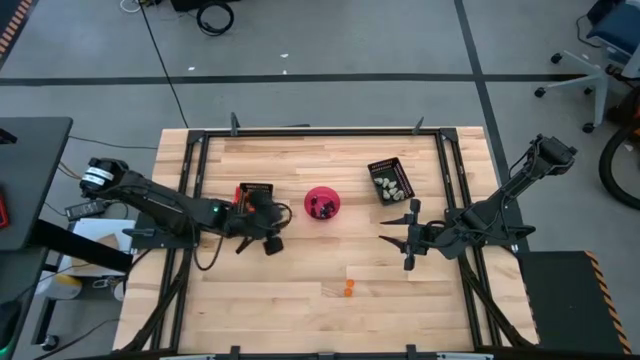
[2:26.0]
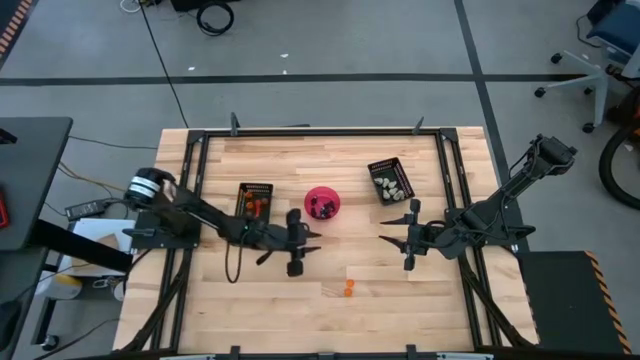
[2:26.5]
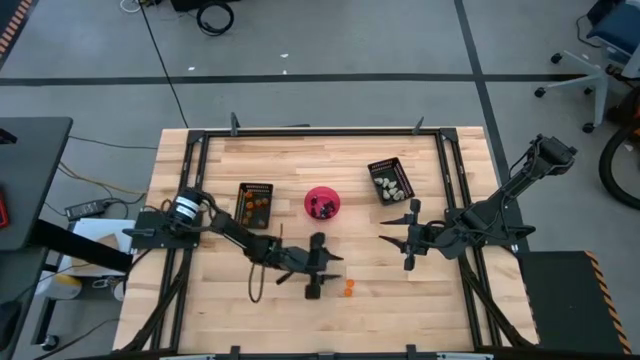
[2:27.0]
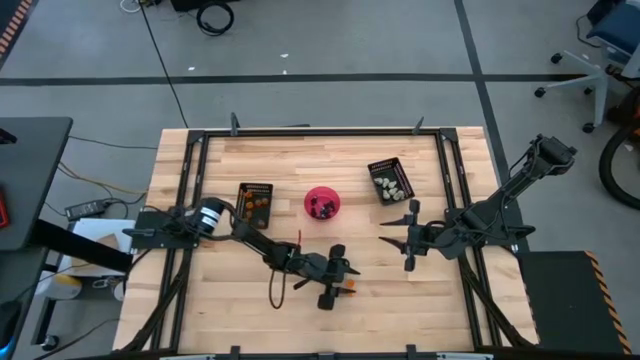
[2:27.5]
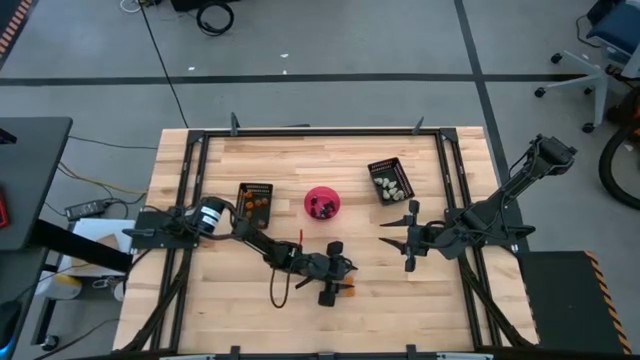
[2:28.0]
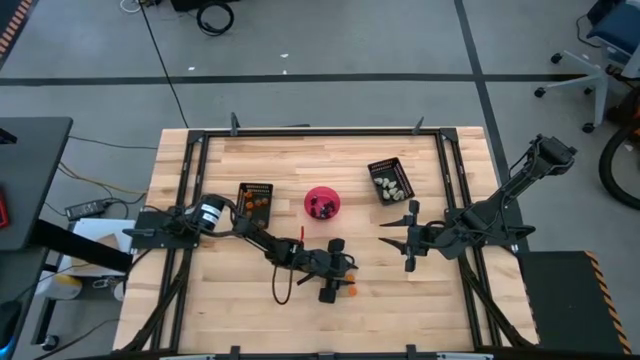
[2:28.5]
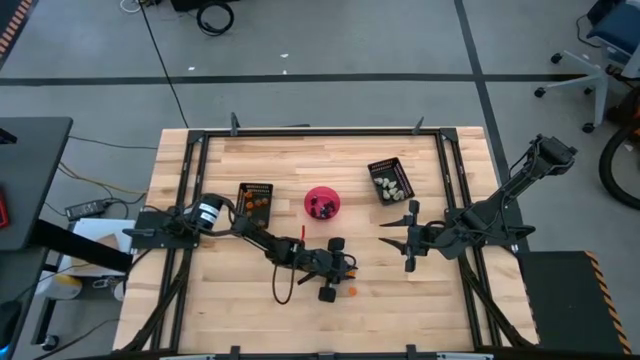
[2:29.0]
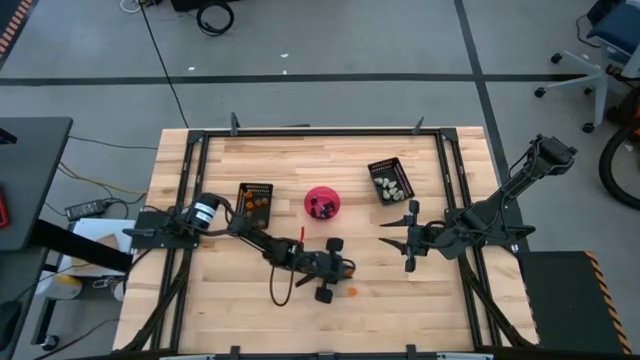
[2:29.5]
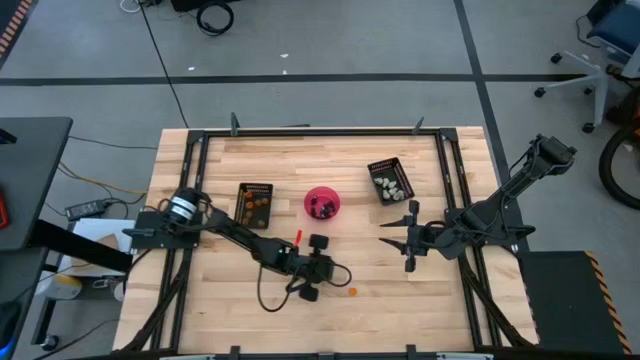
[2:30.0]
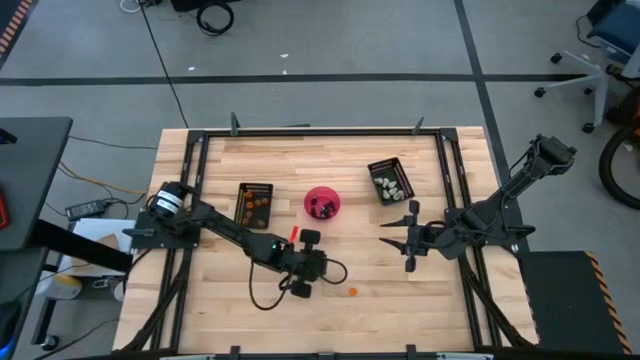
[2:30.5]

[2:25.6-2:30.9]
Task: Sort Halloween decoration
Put the top orange pumpkin toy into the left black bin

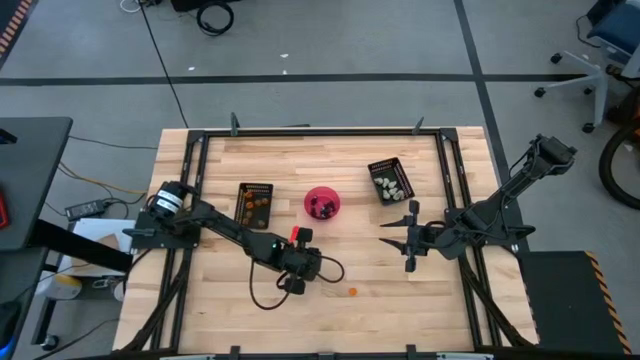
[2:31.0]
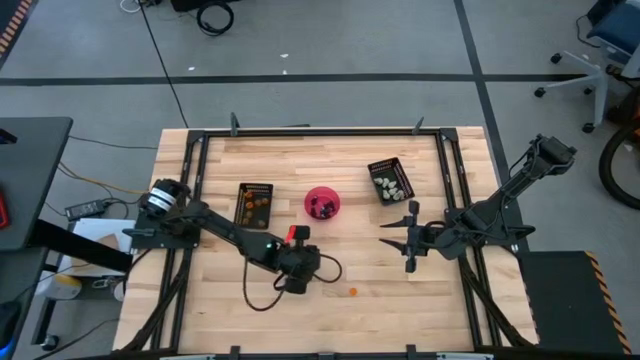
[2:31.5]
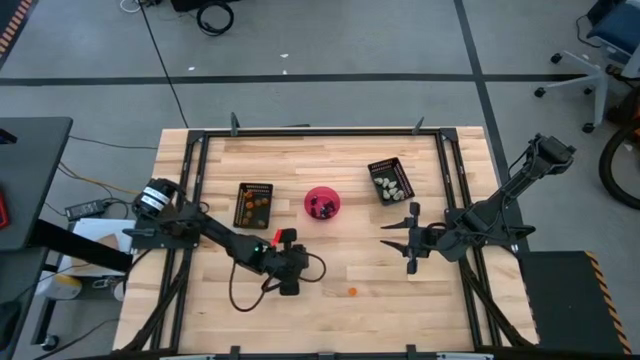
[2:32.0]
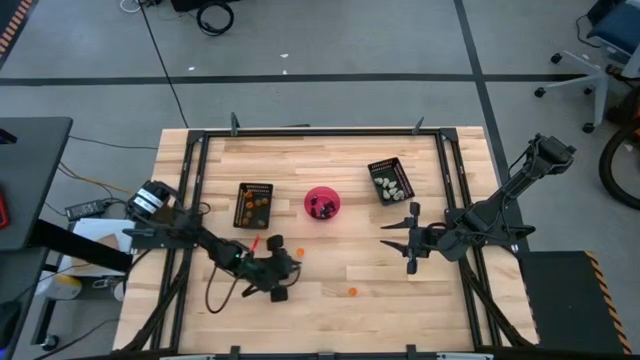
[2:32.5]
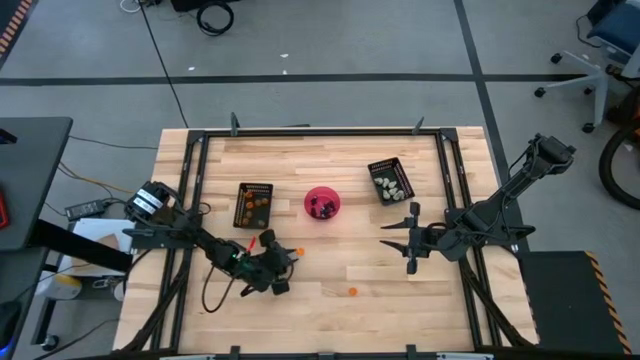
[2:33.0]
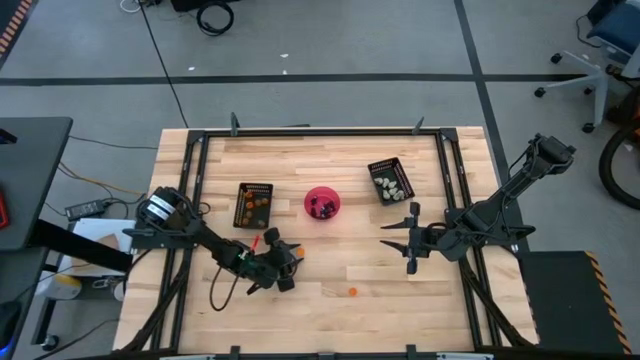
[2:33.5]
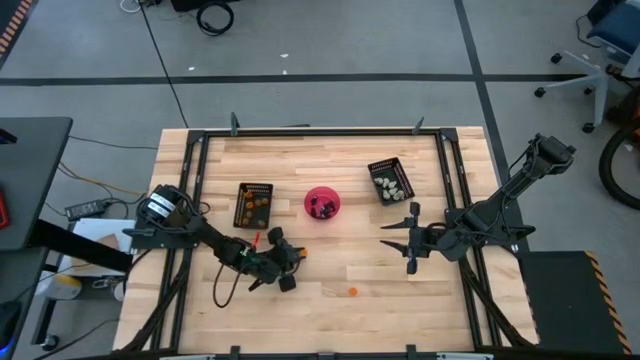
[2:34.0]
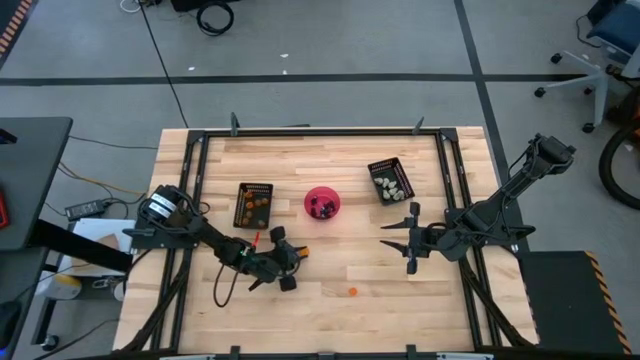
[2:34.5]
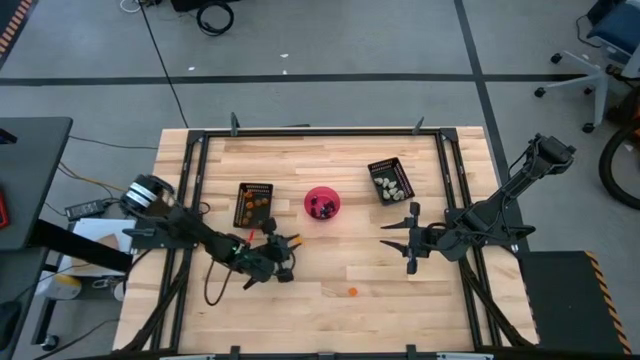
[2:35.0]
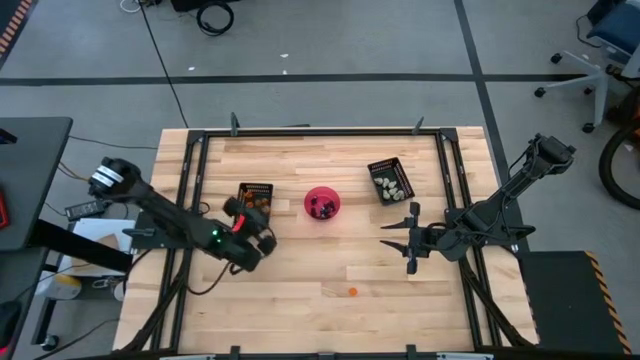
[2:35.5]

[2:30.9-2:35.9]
Put the orange pumpkin toy into the left black bin

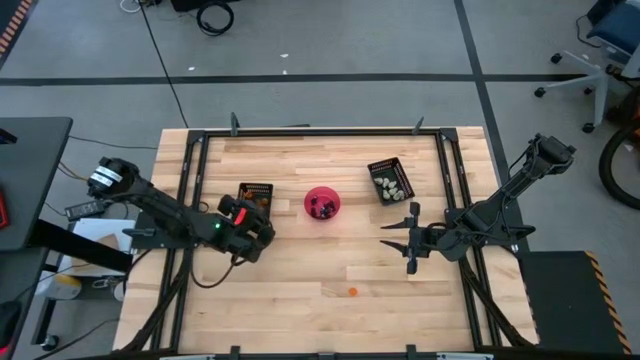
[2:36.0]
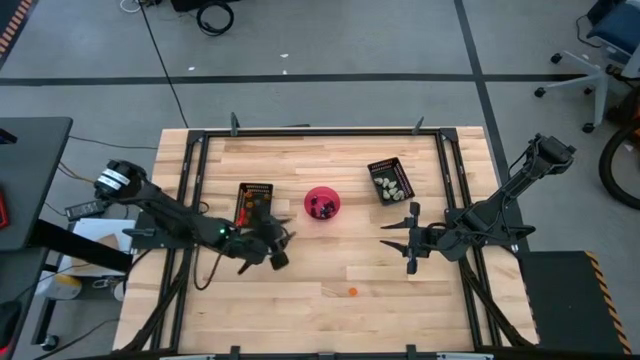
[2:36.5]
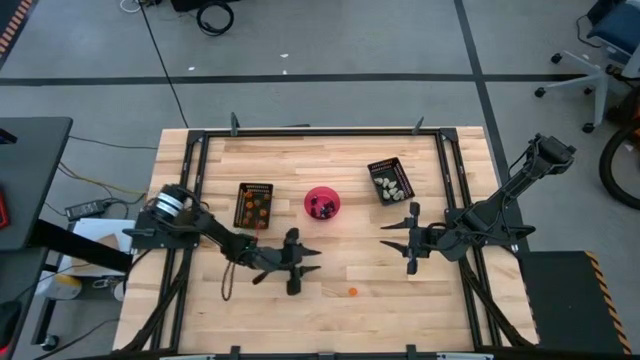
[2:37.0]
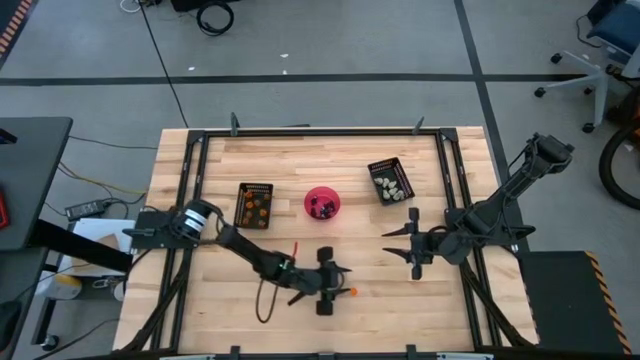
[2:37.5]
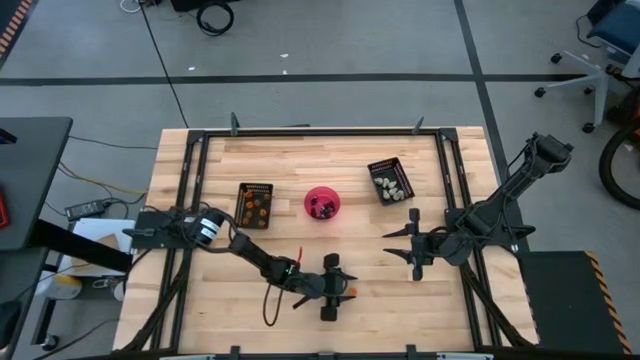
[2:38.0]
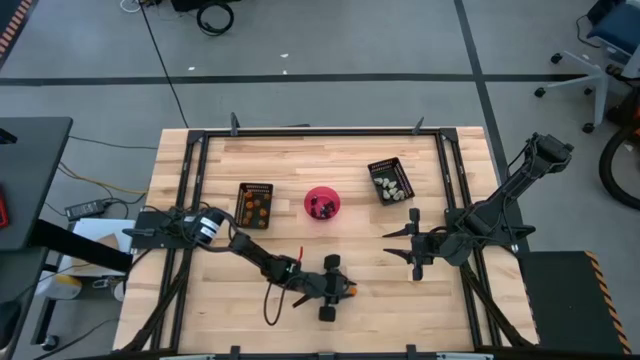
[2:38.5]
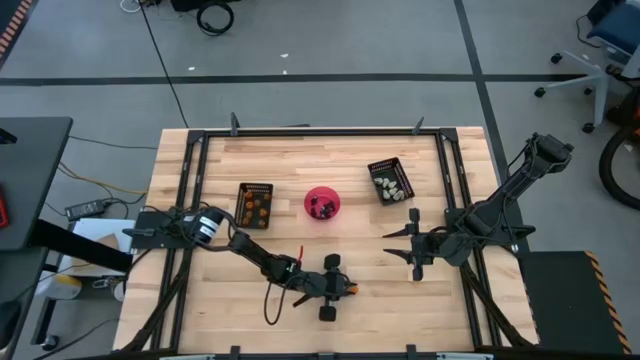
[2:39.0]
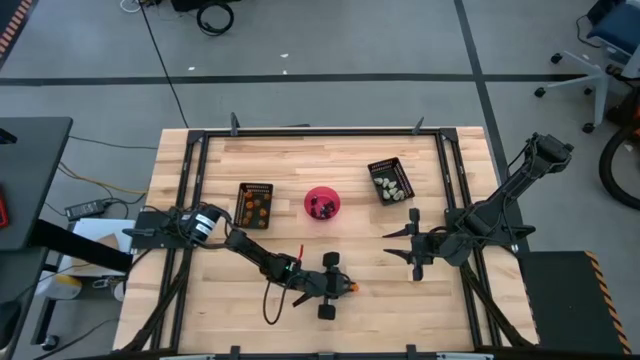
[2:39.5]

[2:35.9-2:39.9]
Put the orange pumpkin toy into the left black bin

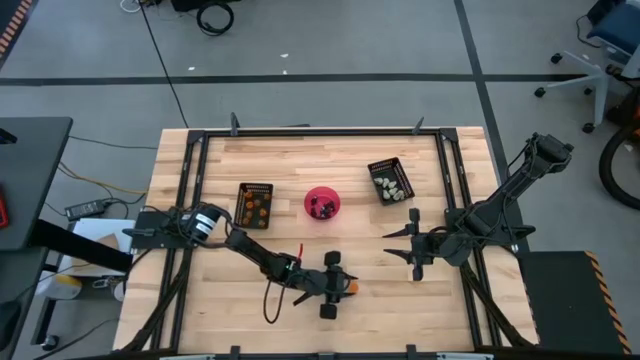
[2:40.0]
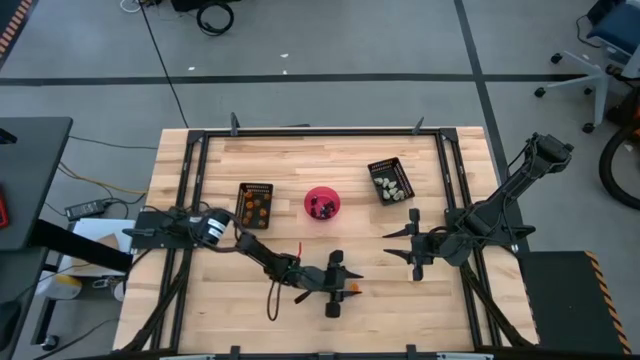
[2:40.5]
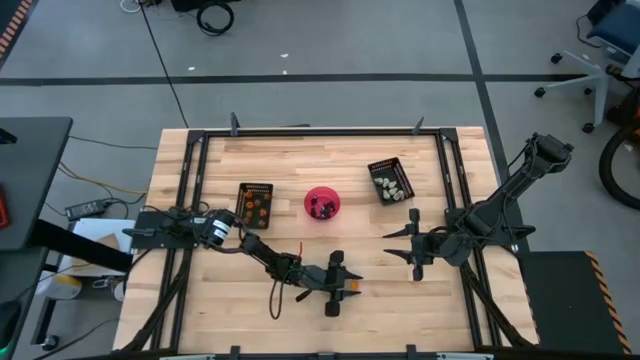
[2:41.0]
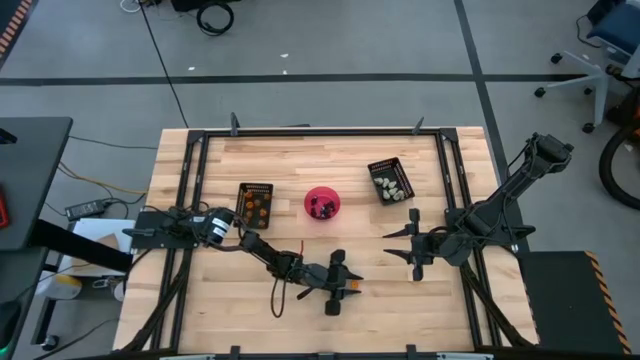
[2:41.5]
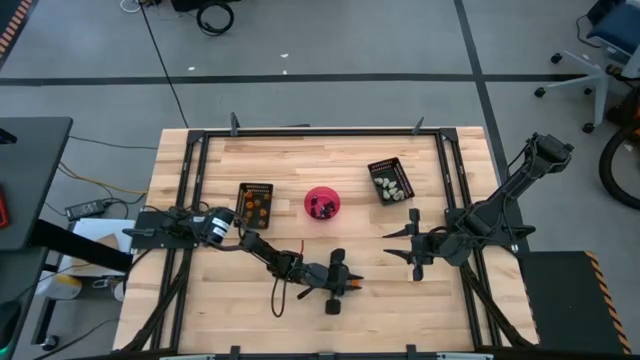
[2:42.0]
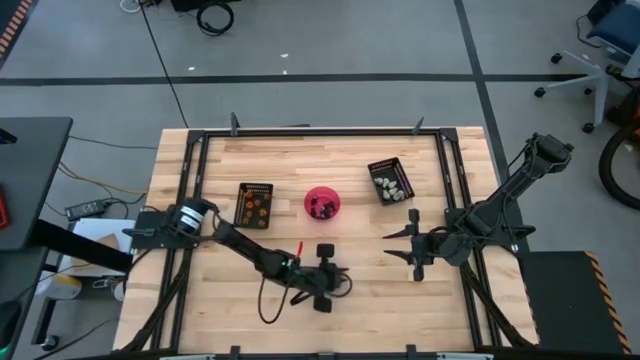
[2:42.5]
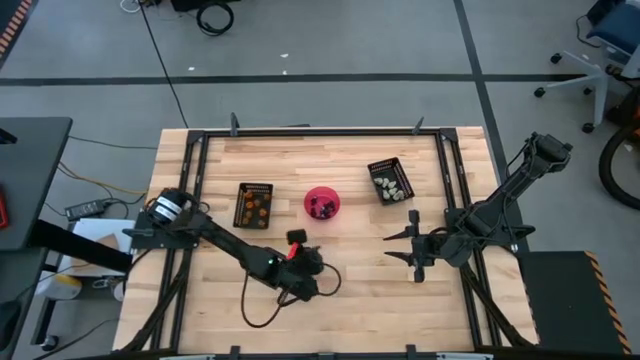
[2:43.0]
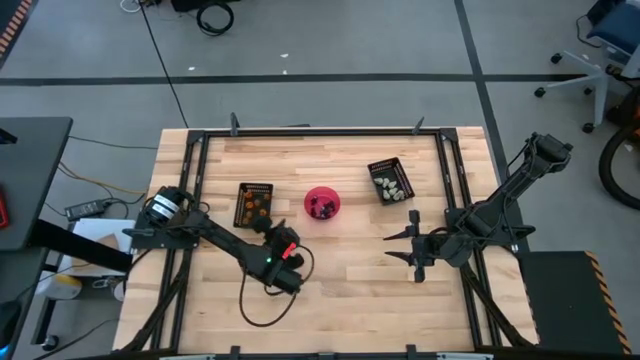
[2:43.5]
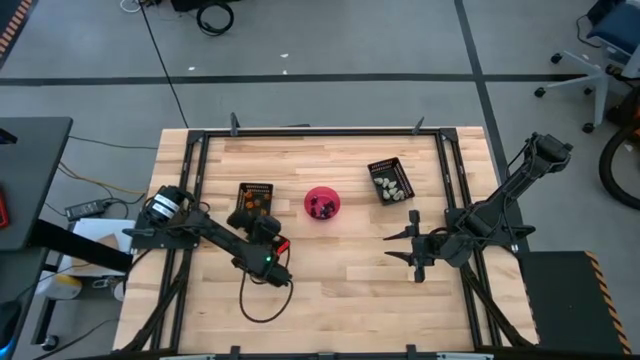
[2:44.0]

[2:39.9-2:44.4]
Put the orange pumpkin toy into the left black bin

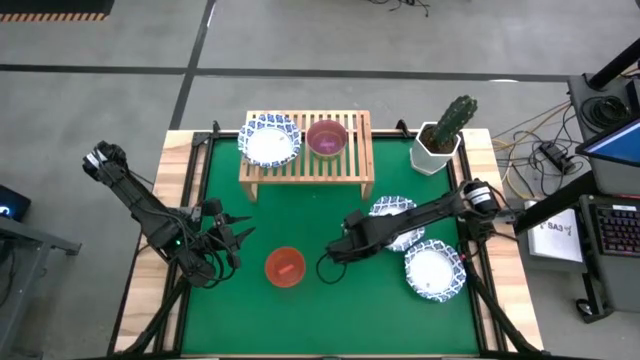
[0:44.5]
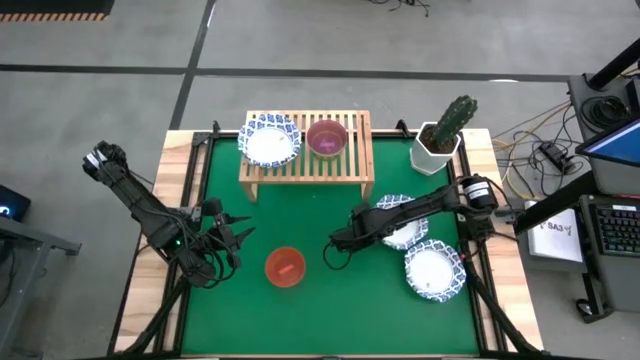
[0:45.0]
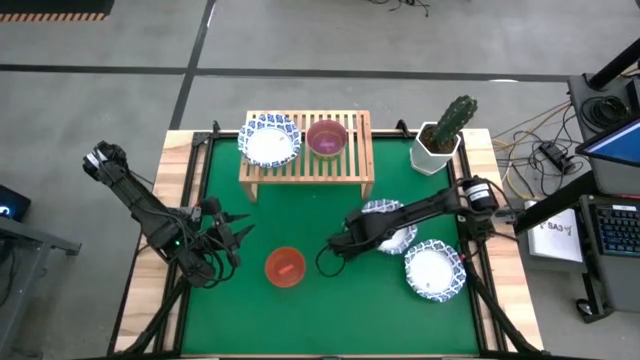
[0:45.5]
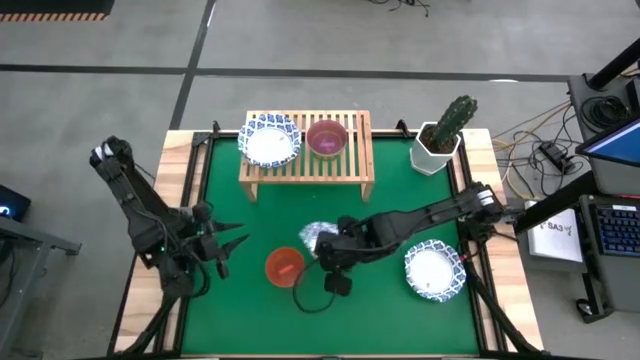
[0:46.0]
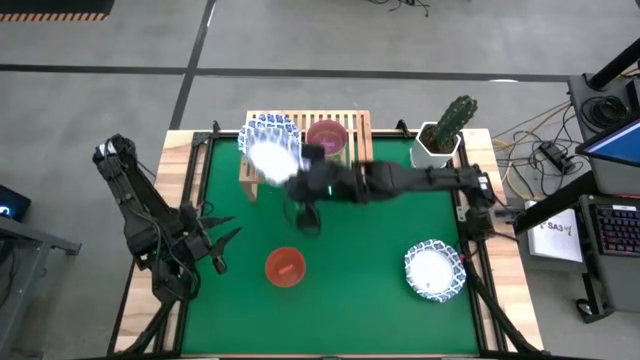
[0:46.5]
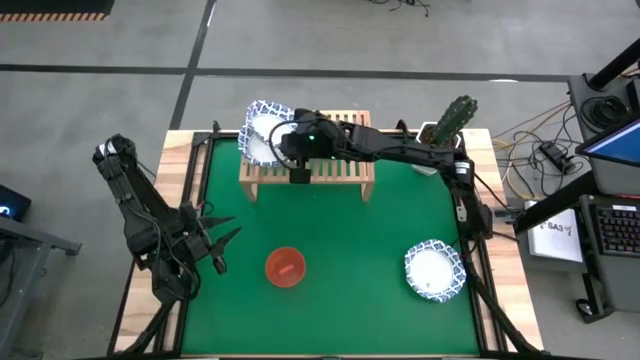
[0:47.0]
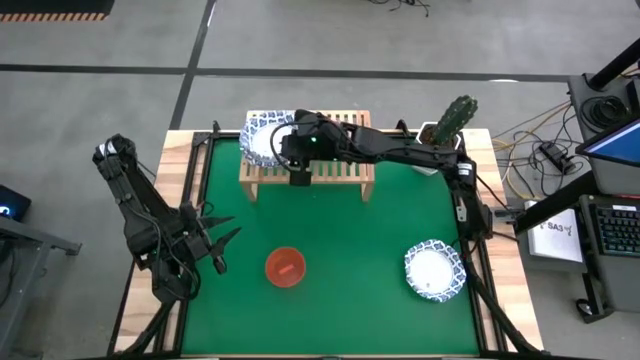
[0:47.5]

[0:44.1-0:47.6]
Task: Place and stack bowls onto a shelf
Stack the large blue patterned on top of the large blue patterned bowl on the shelf
